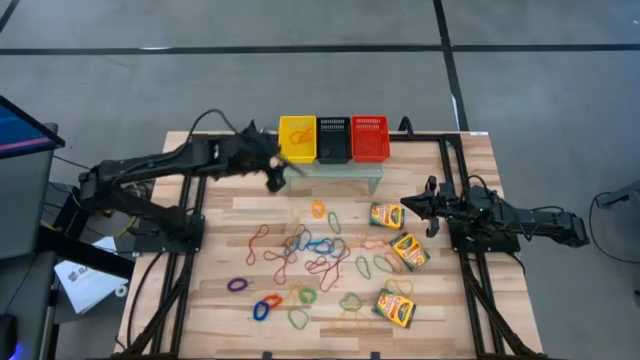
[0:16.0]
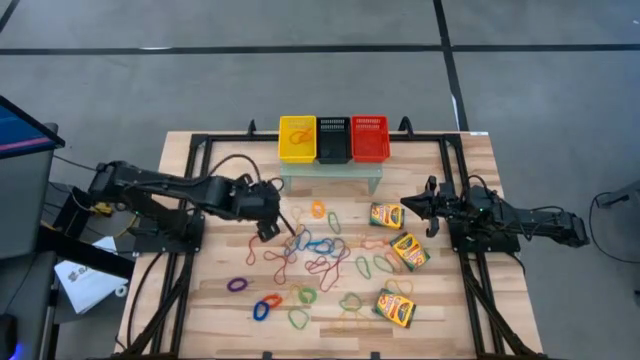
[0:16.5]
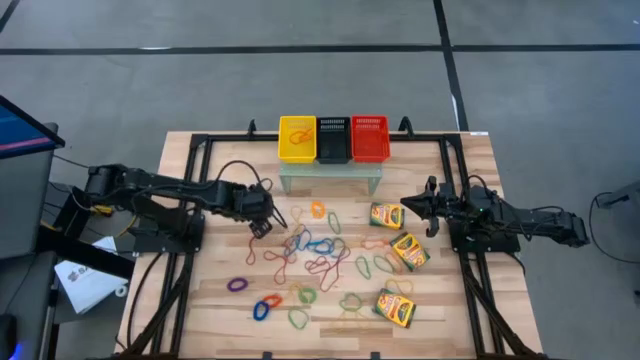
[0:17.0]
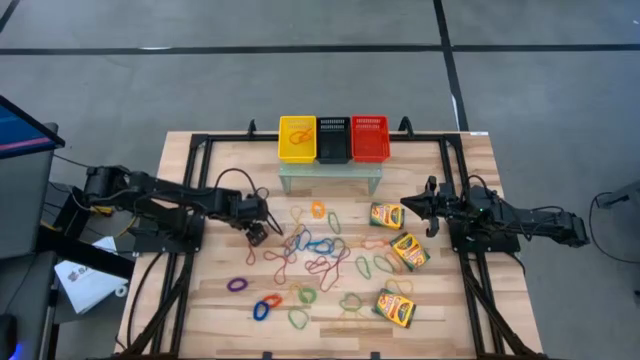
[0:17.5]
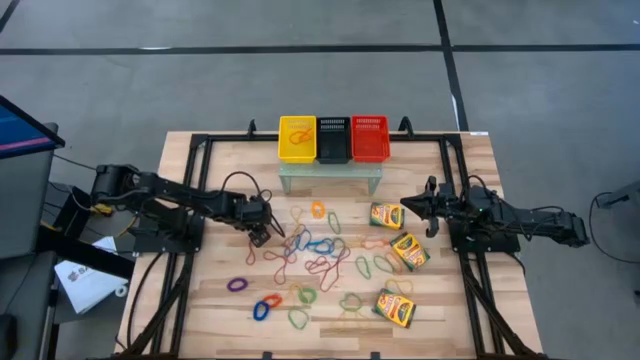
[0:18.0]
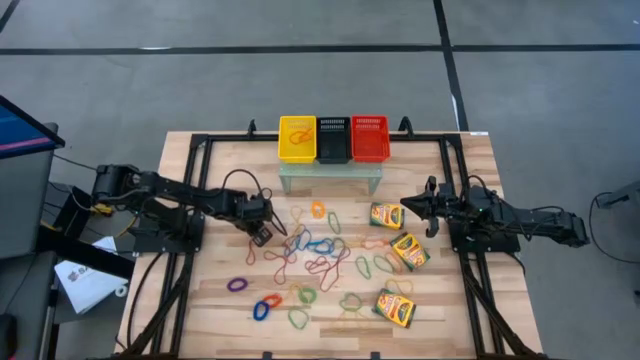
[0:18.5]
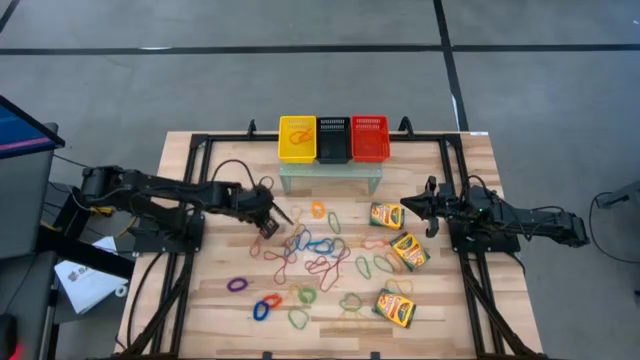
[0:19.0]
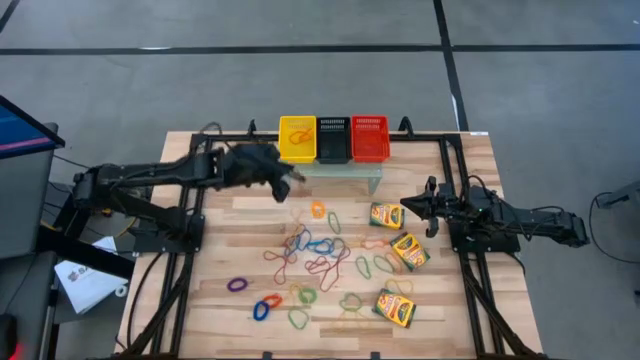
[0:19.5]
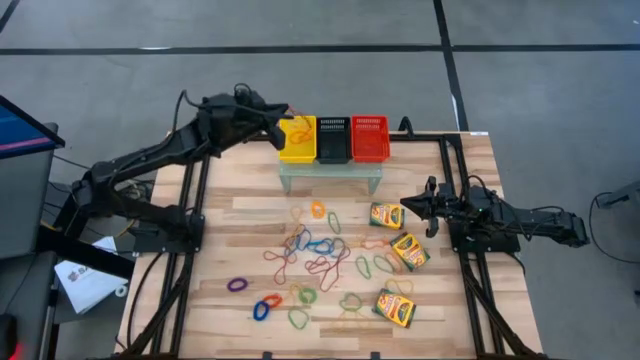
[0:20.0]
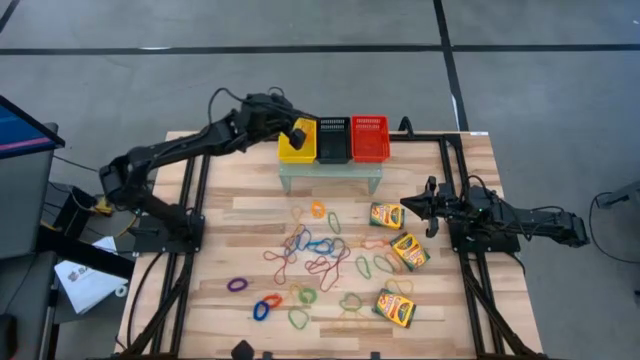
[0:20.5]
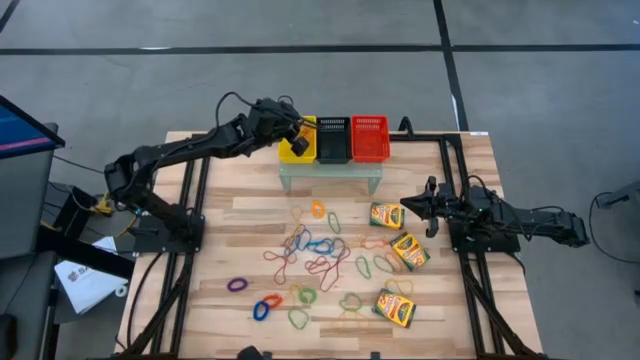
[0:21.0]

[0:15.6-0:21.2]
Task: Pick & Place Office Desk Supplies
Put the big red rubber band into the yellow bin on the shelf

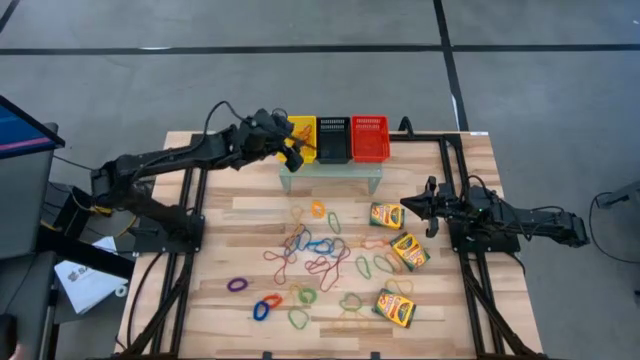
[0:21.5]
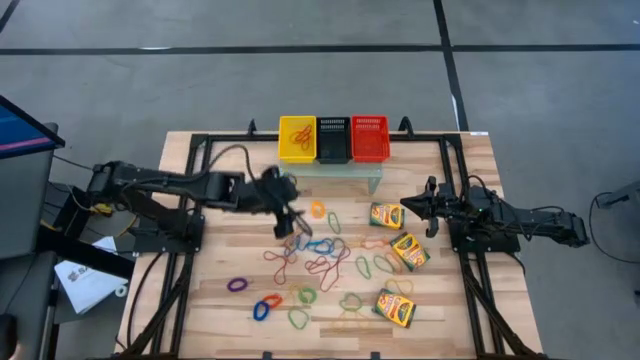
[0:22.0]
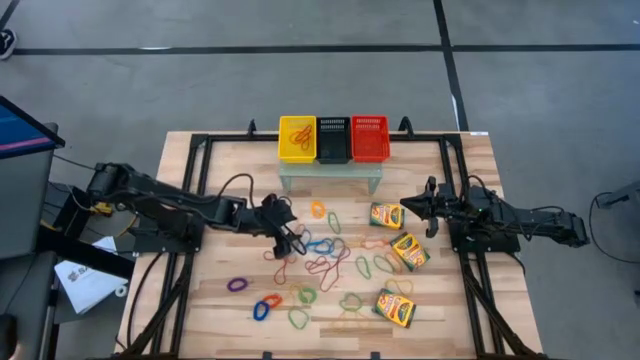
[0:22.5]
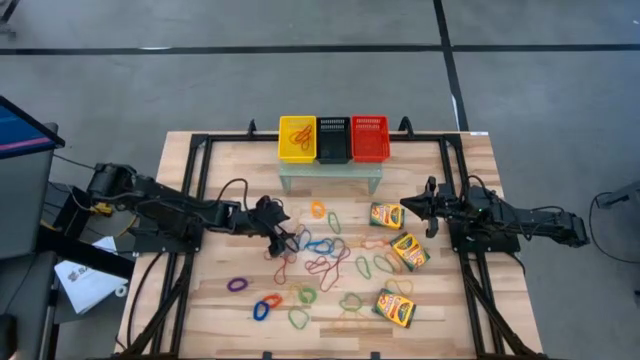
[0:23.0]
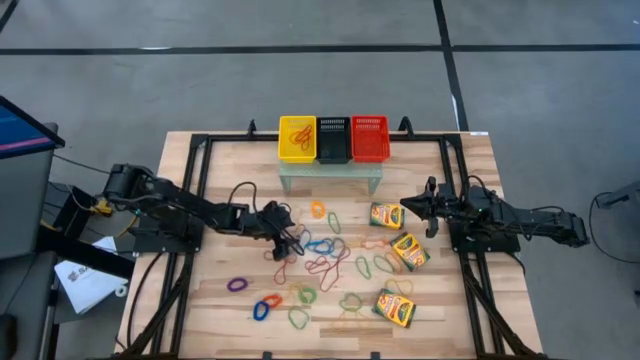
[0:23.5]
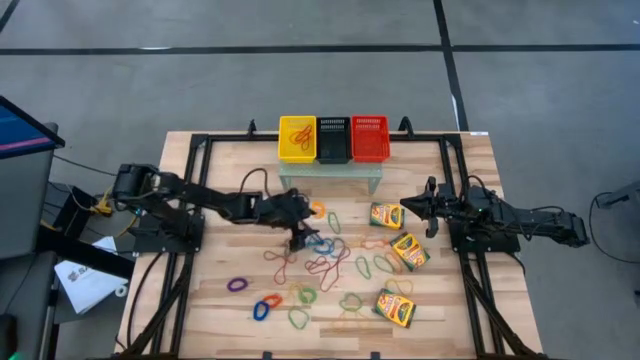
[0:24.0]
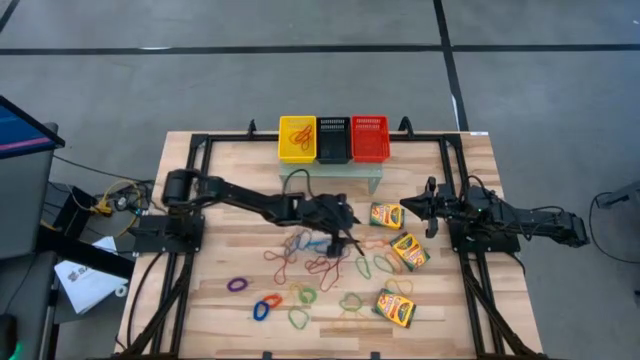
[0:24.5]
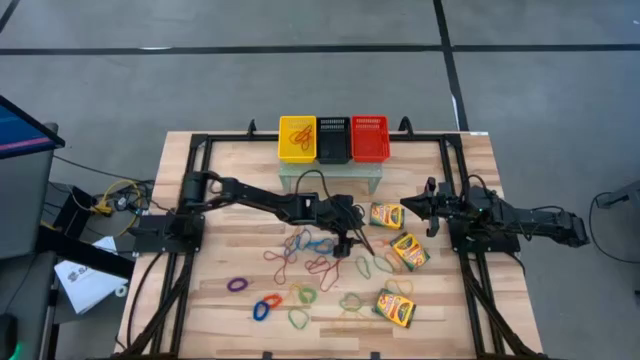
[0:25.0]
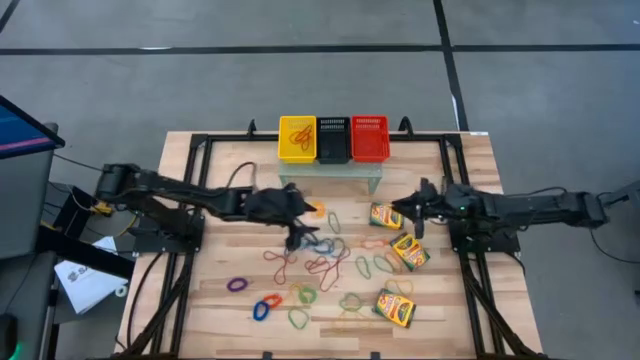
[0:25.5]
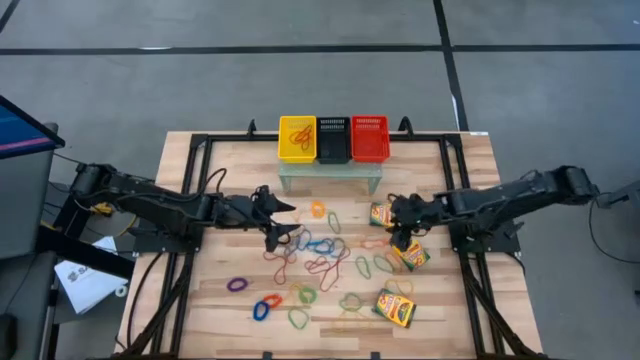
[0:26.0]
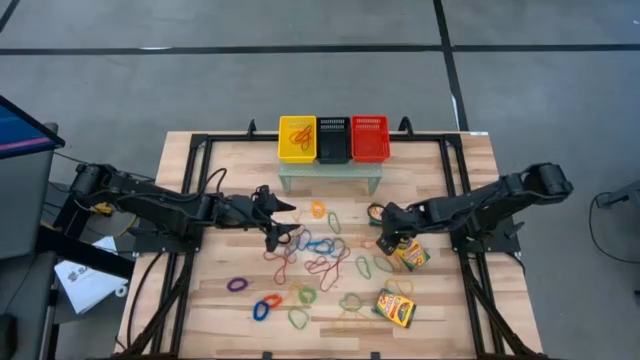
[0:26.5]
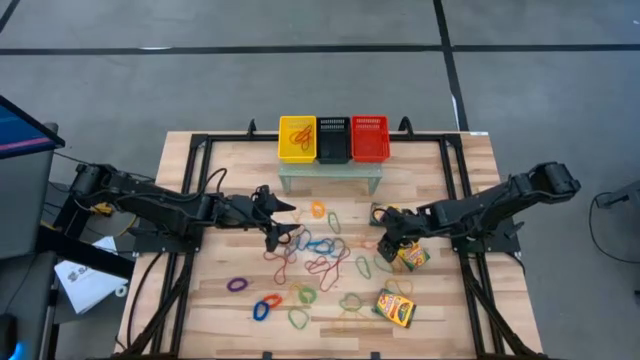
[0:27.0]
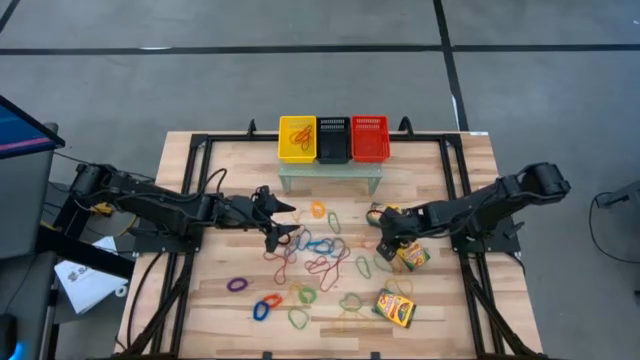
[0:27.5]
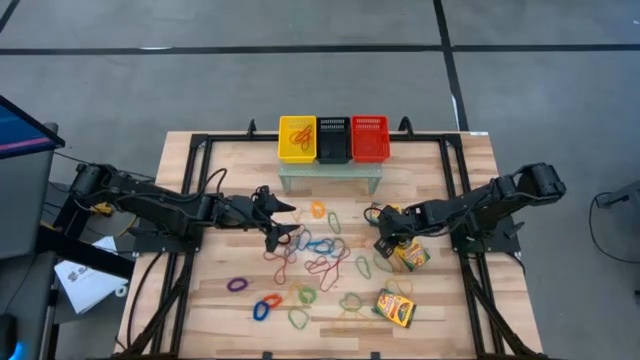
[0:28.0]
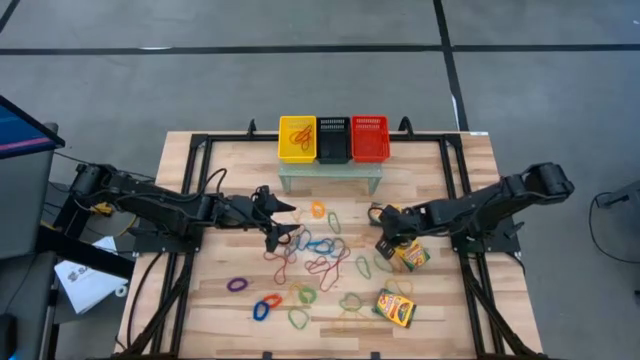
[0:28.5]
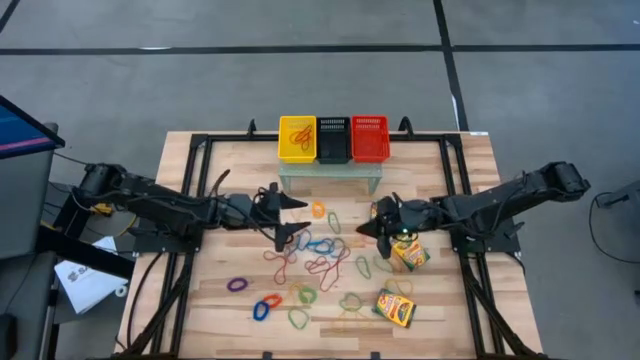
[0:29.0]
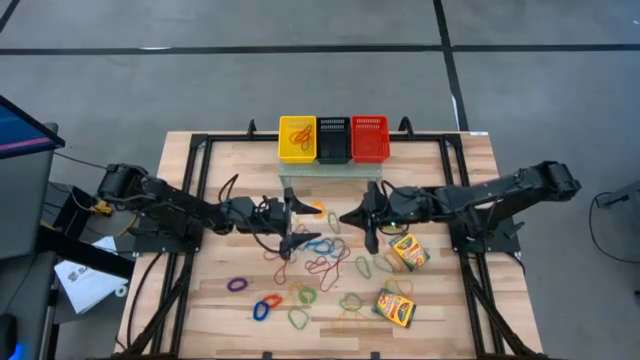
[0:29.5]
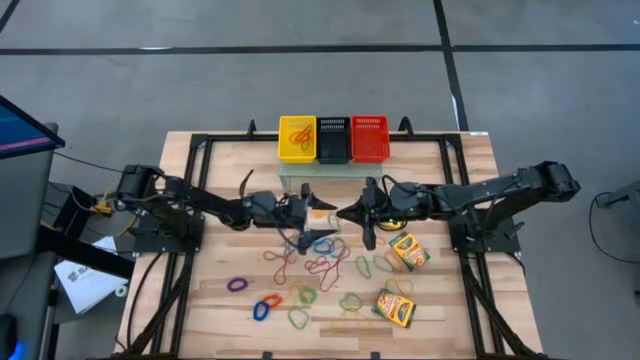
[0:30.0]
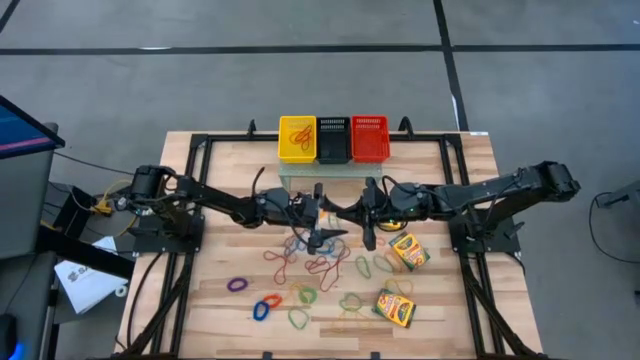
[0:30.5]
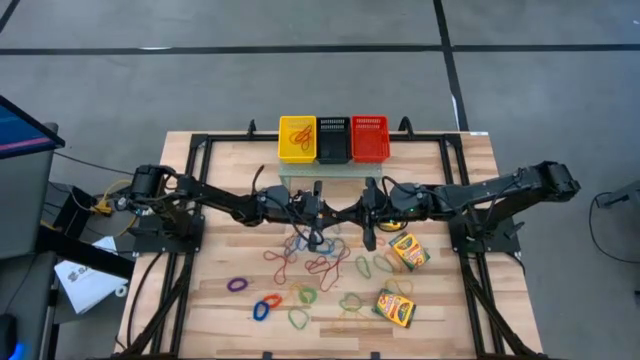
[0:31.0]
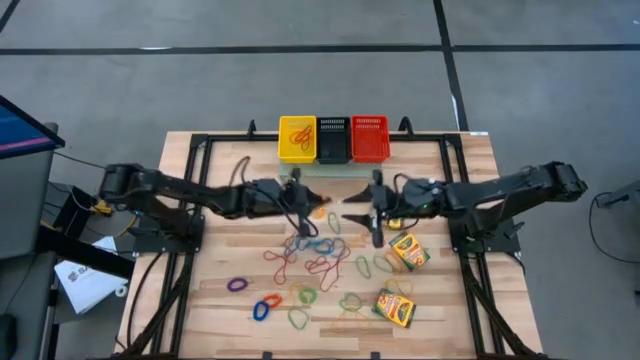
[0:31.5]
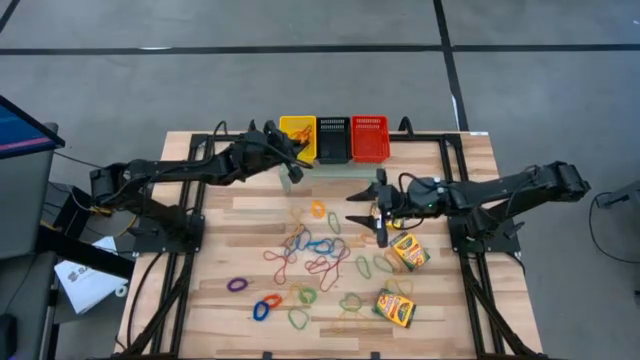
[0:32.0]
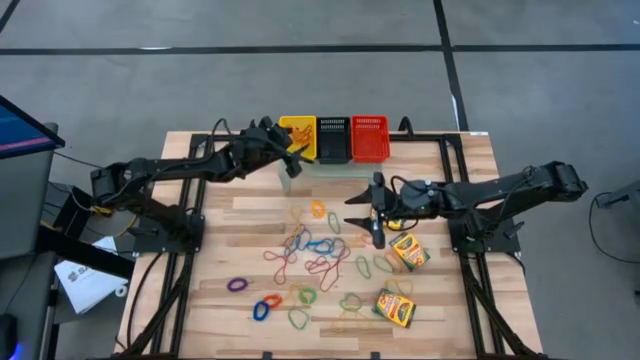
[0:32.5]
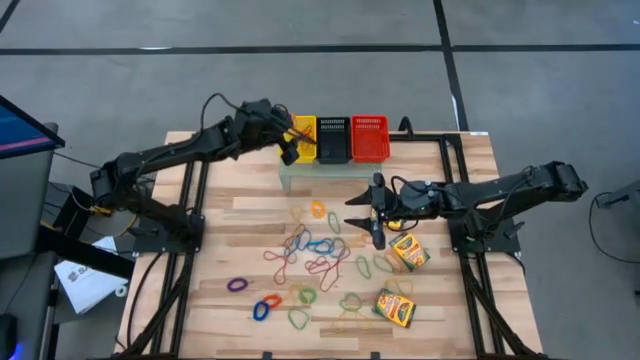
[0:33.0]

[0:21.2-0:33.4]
Put the top right small orange rubber band into the yellow bin on the shelf

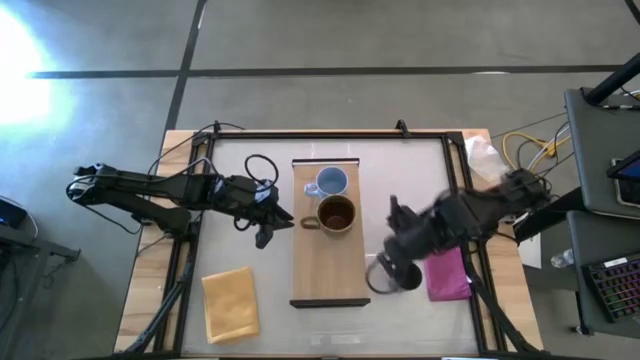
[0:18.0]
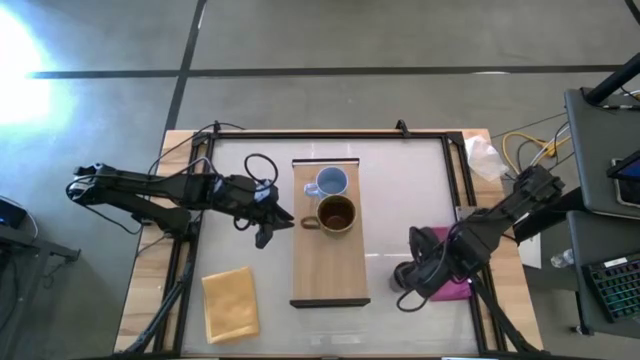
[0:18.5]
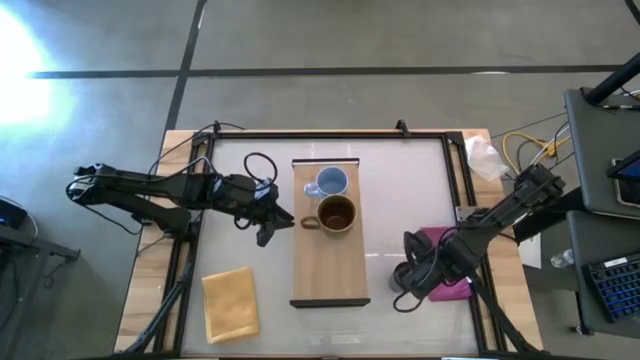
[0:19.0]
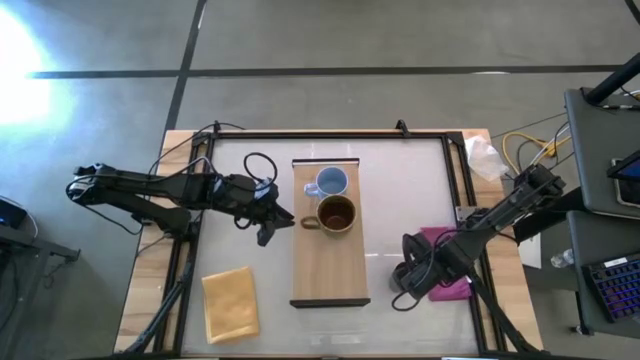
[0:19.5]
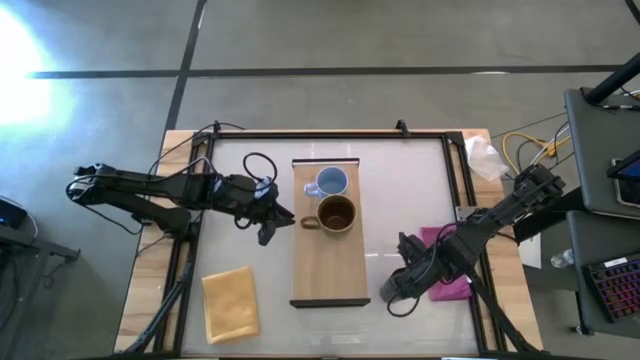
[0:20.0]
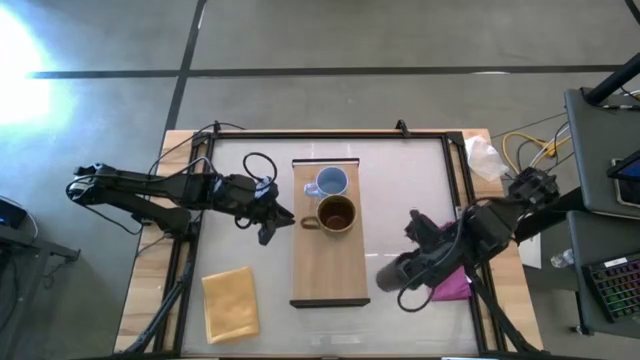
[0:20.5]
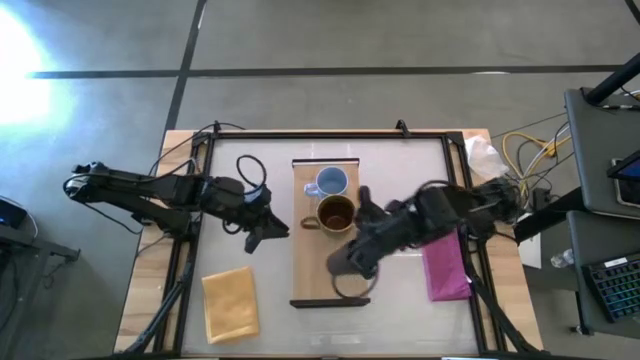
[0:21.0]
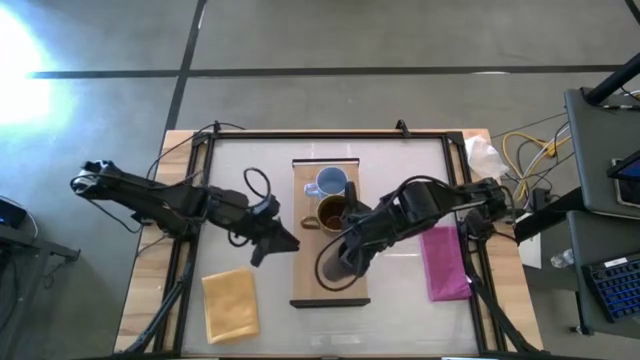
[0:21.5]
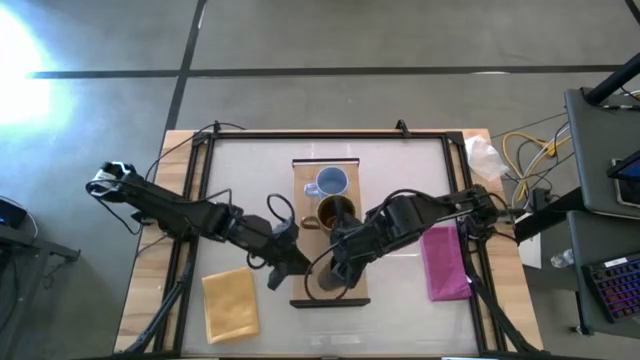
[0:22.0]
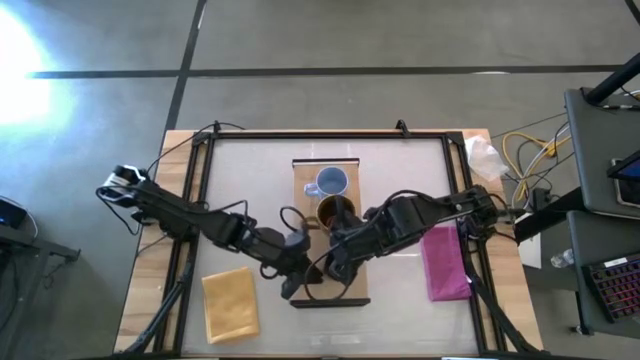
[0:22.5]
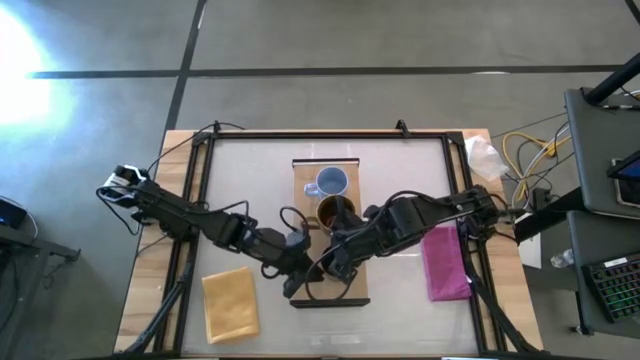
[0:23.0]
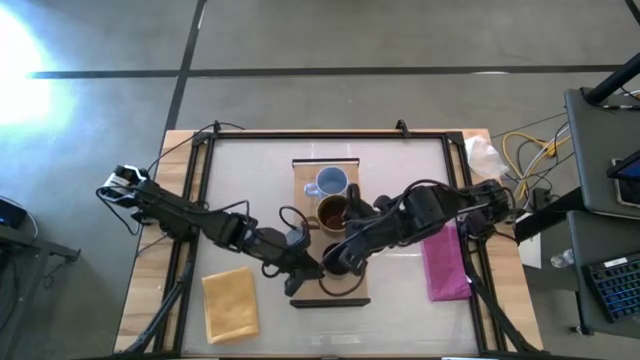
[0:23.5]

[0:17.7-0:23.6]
Task: Stack small to large cups/mugs on shelf
Put the black cup on the shelf
